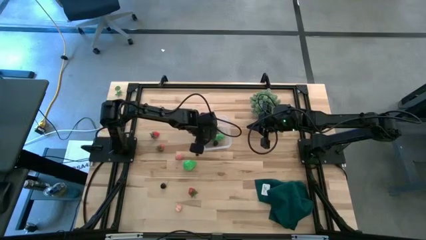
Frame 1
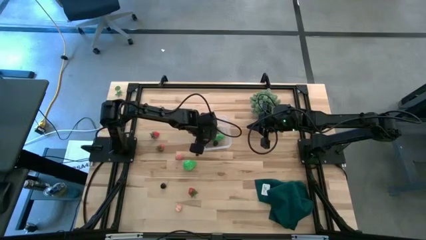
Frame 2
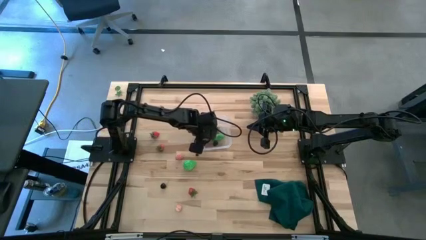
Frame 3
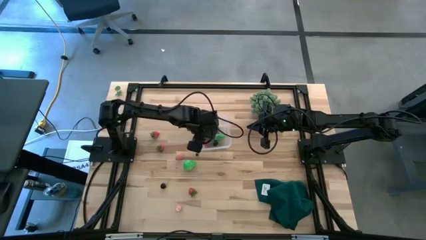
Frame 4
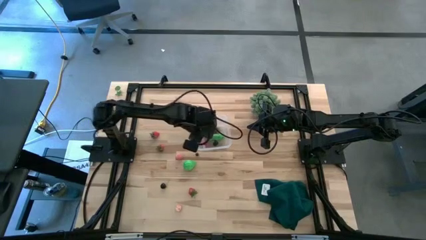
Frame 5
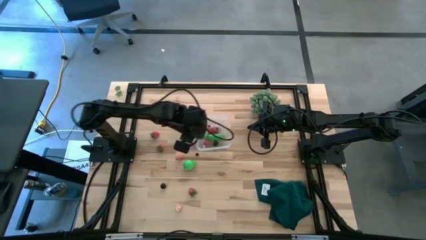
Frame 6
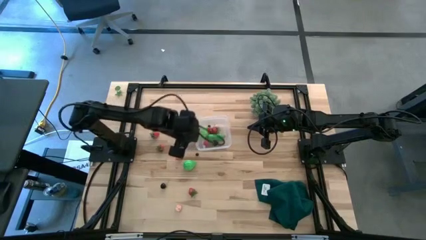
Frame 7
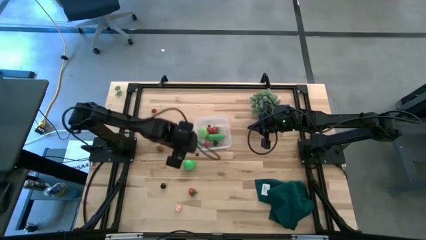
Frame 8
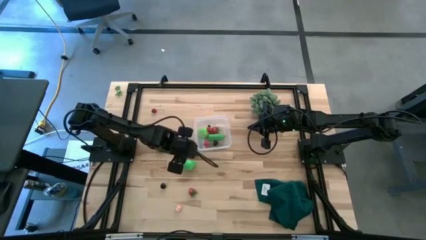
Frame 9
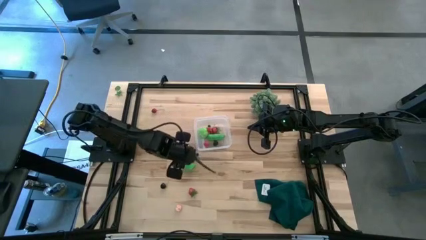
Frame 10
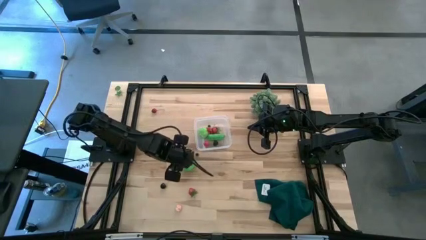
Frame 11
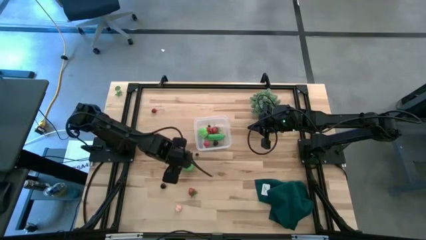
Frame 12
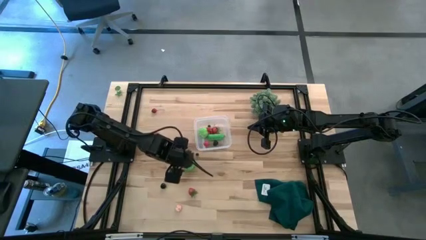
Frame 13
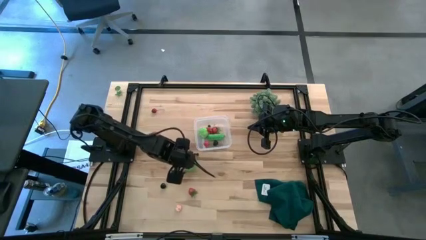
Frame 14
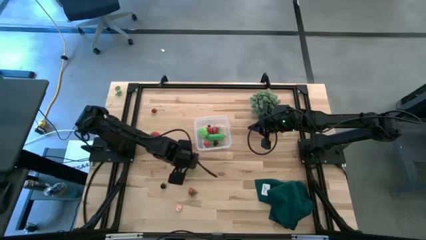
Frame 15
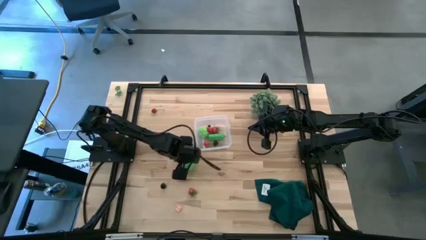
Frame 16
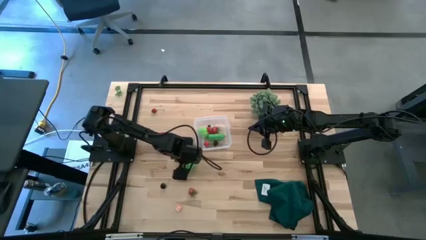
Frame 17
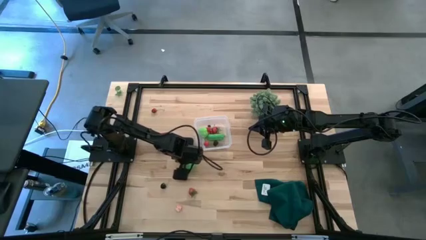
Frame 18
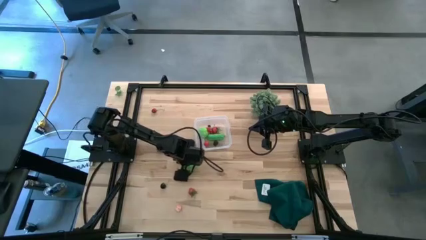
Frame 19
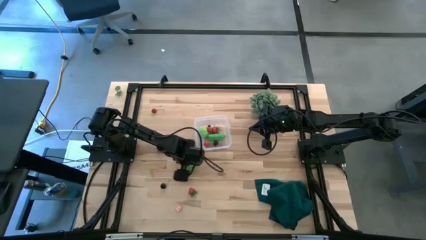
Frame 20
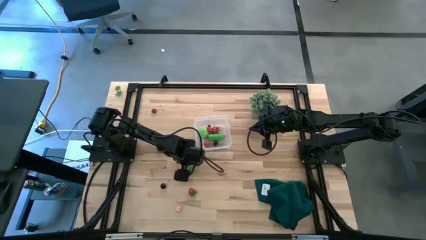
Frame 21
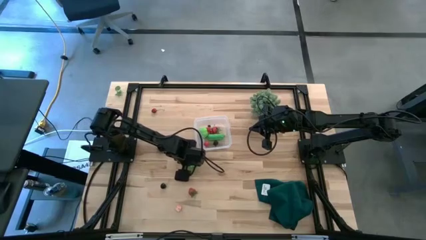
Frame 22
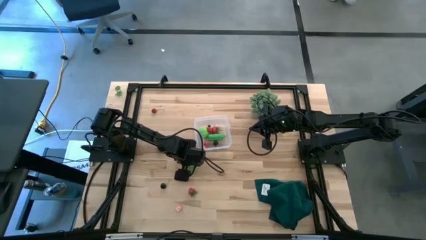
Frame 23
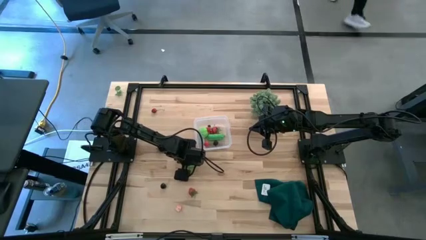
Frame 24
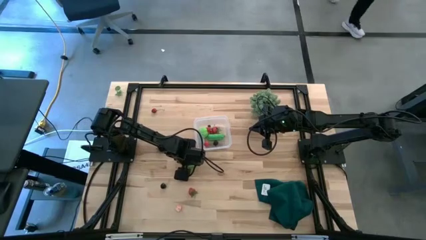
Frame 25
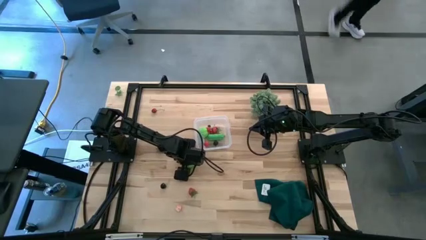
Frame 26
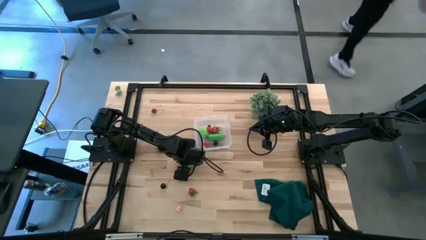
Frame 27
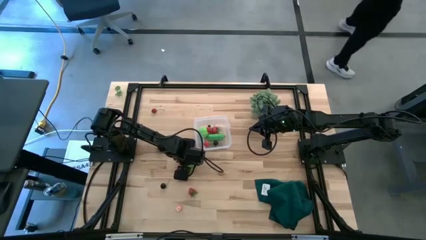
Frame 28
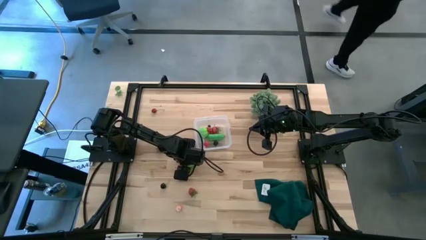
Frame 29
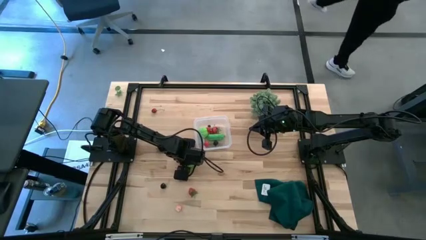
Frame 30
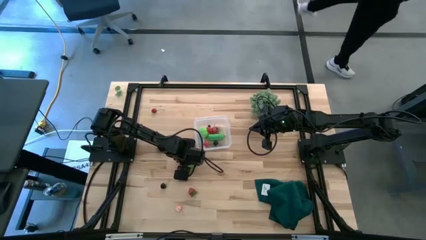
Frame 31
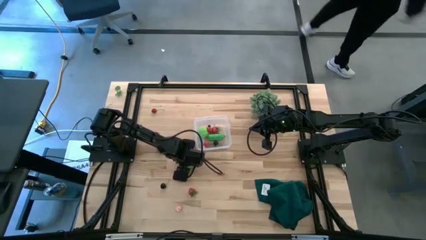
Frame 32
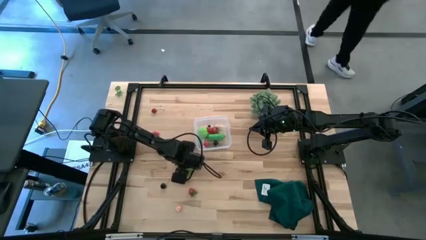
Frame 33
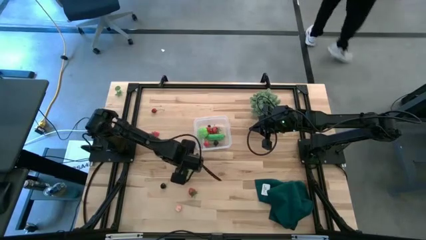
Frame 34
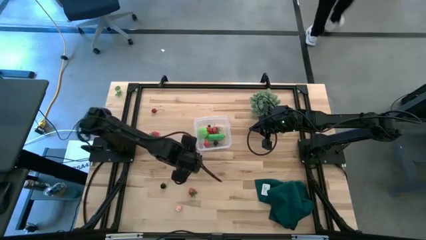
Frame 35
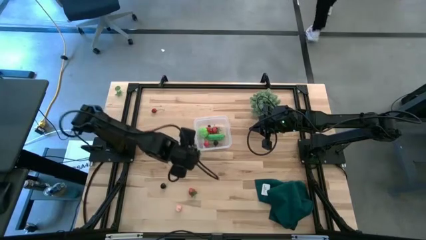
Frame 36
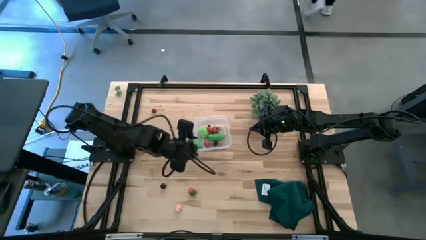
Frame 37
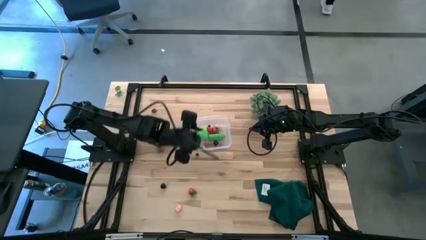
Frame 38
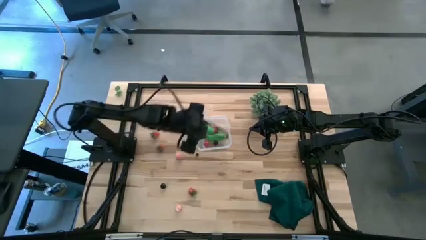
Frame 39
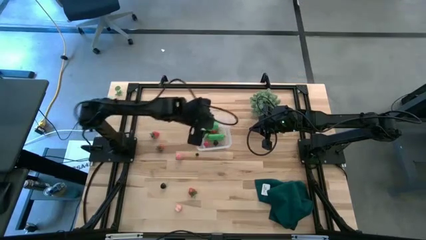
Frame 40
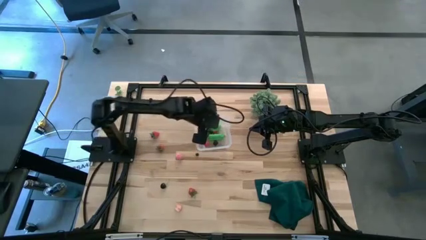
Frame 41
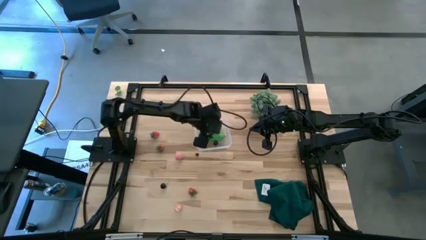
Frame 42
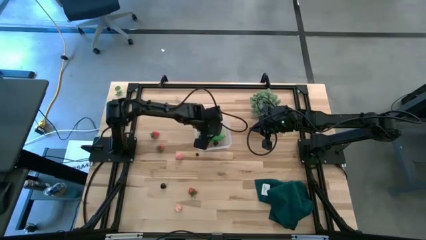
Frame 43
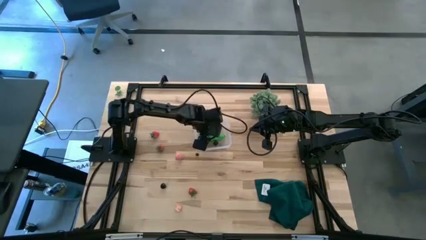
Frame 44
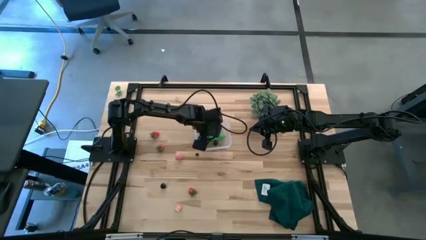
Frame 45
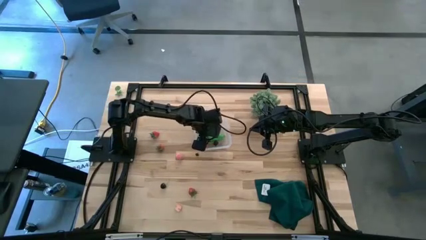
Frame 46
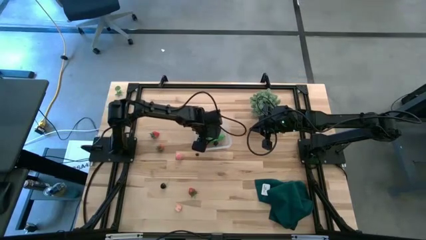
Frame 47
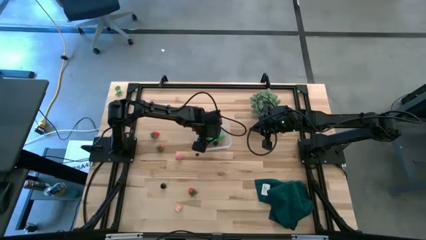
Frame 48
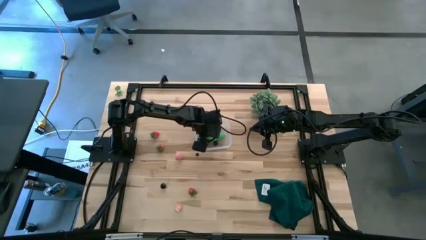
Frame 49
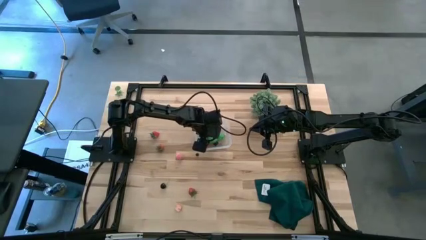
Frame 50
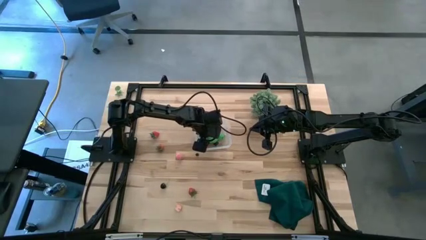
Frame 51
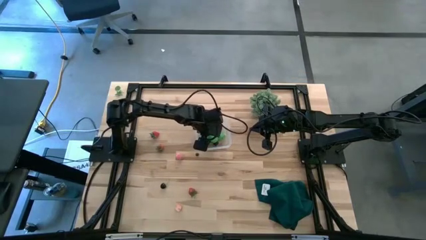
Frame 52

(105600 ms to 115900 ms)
Task: Pick and placing Produce into tupperware
Put the pear into the transparent bin

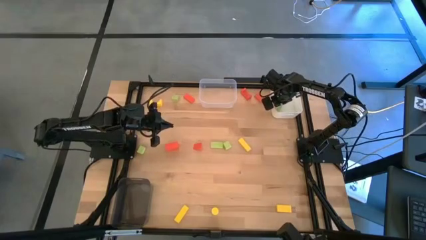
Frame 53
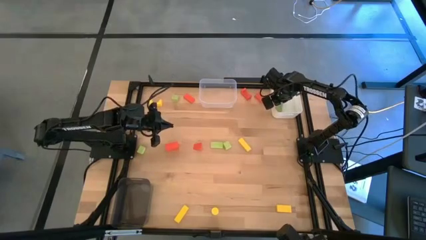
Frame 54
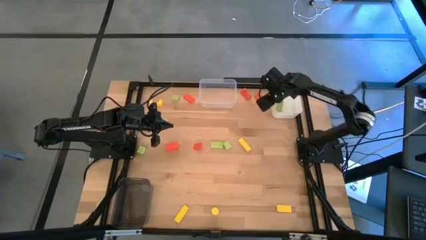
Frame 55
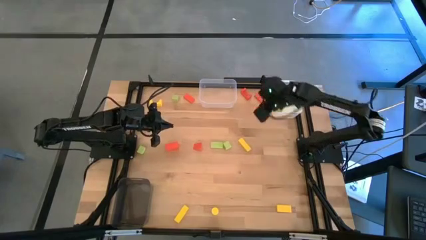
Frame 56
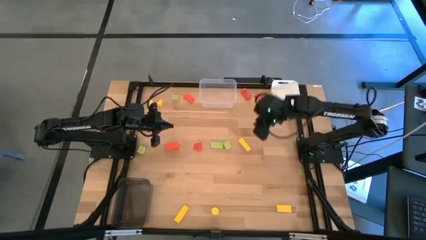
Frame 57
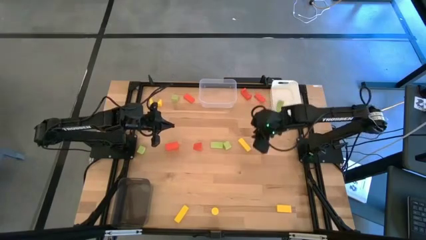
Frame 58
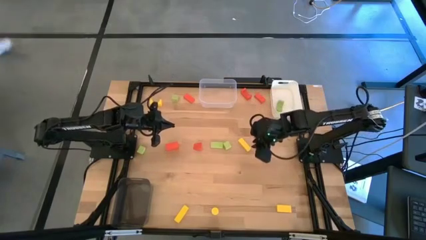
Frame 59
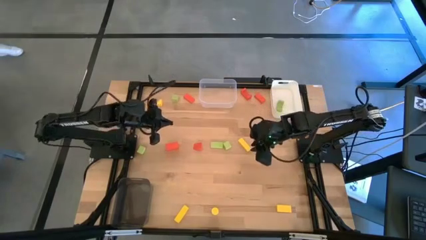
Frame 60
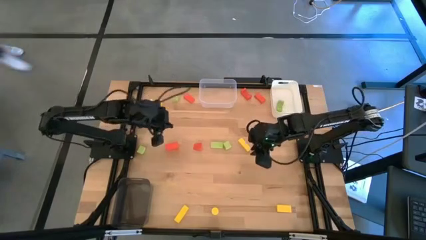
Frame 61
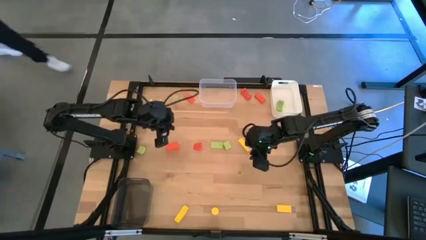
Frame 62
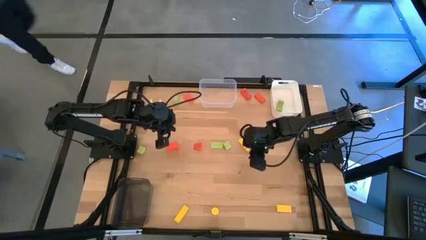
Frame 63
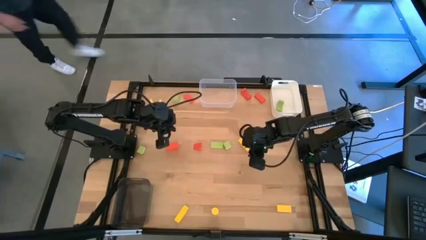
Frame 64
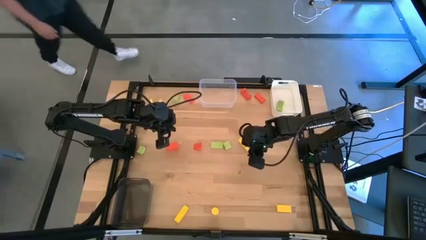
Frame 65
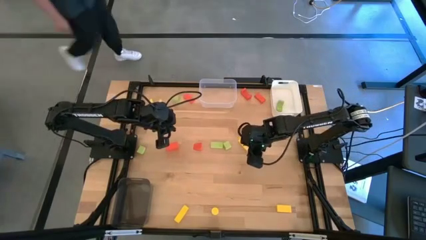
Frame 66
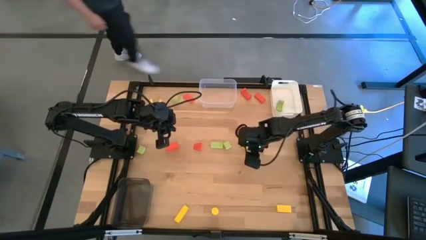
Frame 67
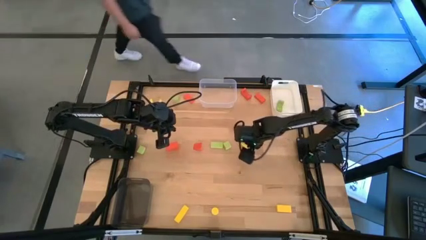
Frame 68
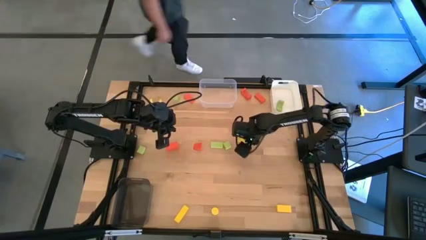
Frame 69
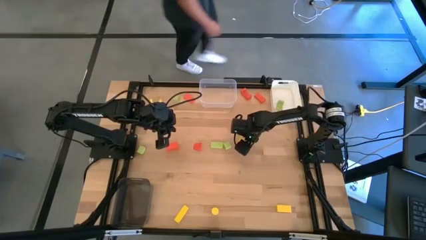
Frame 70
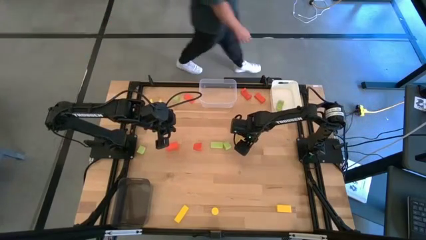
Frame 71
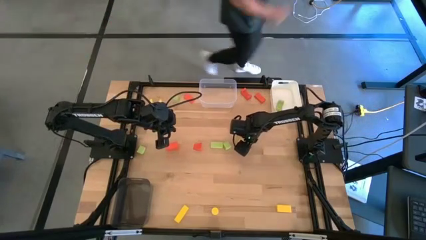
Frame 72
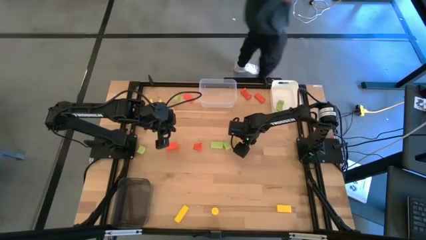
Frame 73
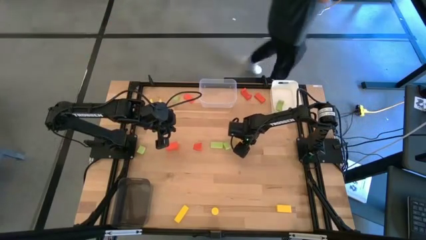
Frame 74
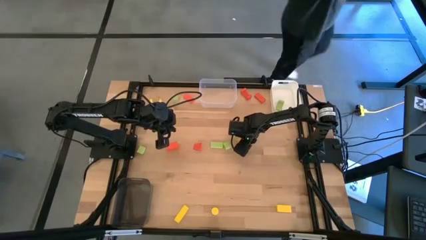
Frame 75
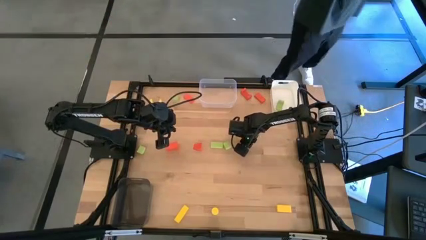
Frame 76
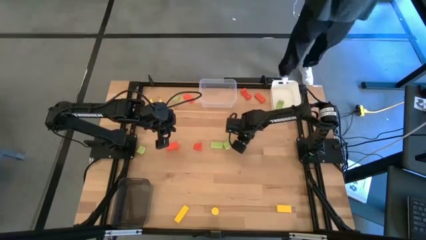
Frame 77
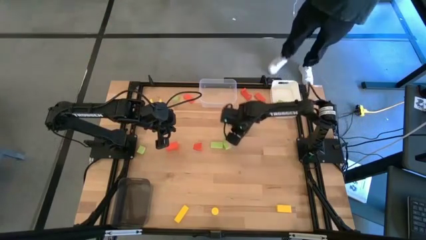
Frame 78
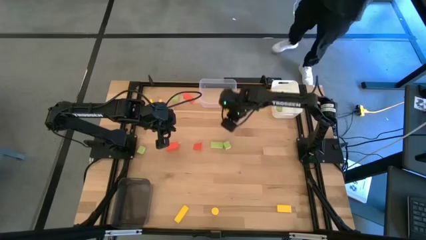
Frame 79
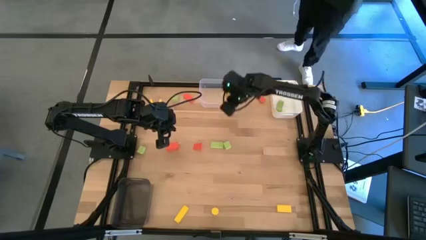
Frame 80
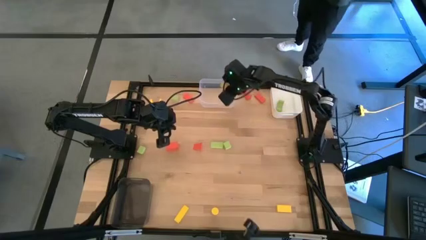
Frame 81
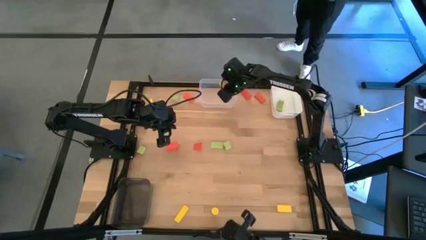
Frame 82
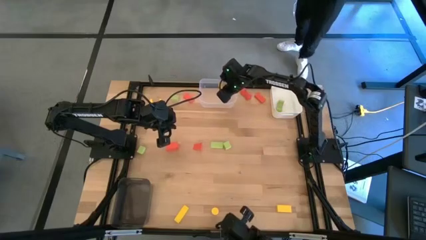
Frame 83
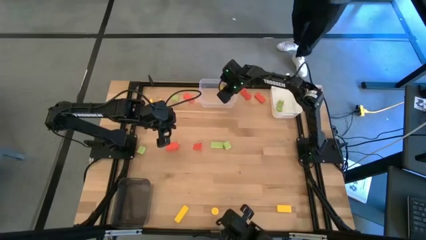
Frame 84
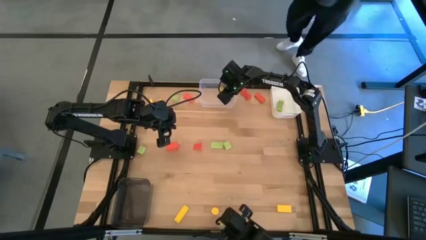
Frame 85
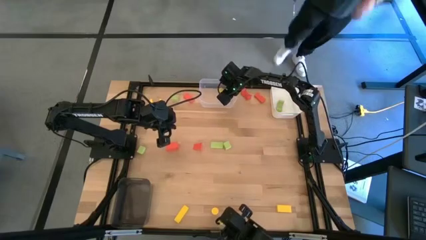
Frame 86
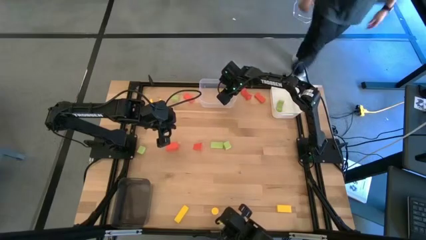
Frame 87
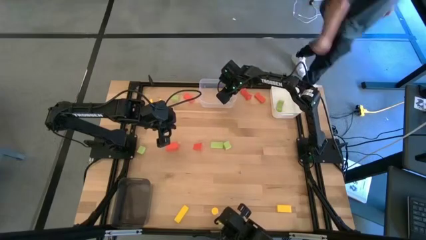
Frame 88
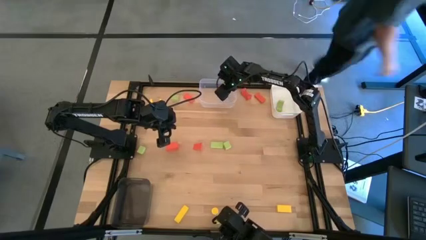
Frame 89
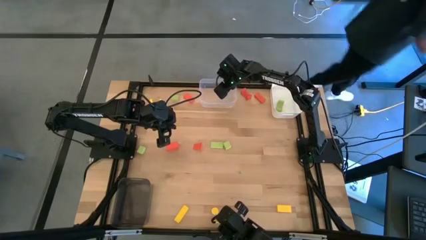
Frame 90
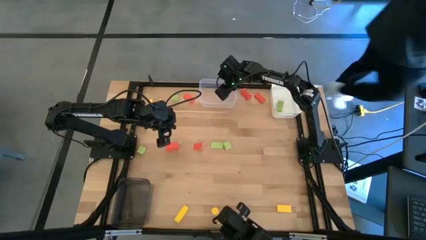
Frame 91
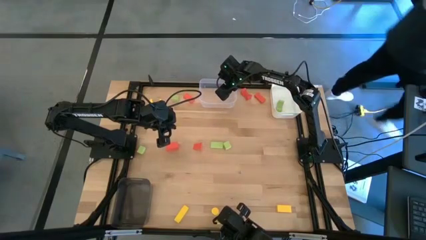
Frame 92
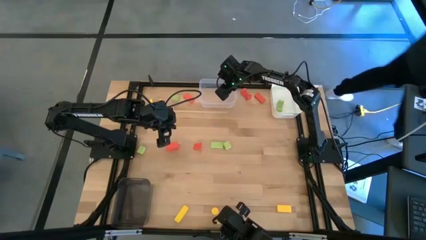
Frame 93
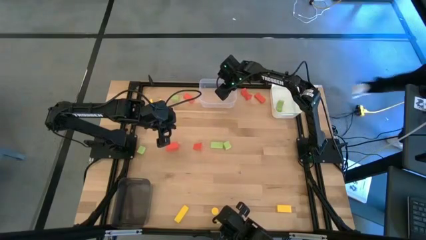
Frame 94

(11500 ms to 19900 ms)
Task: Sort & place blocks by color
Put the yellow cylindrical block into the transparent bin
